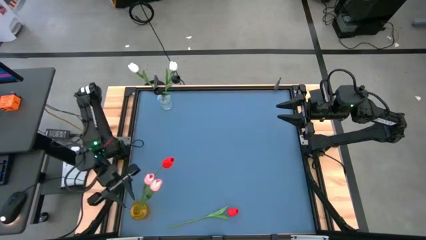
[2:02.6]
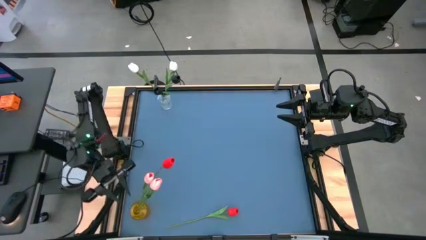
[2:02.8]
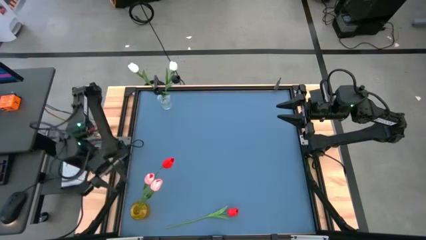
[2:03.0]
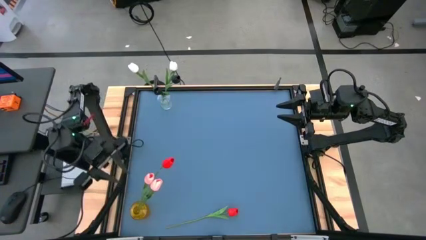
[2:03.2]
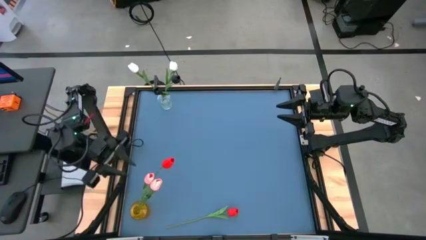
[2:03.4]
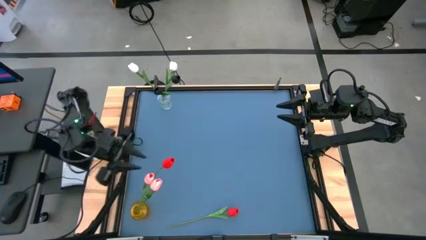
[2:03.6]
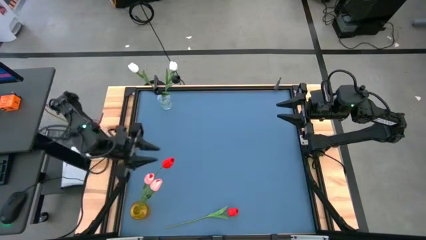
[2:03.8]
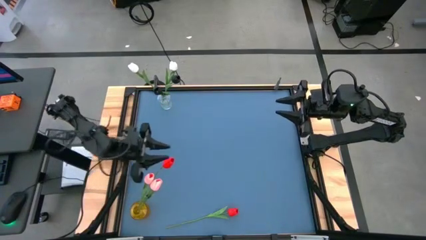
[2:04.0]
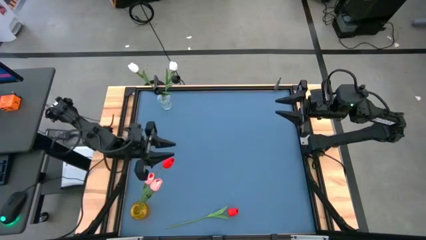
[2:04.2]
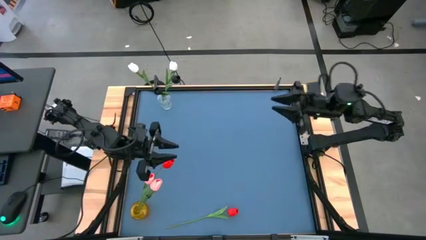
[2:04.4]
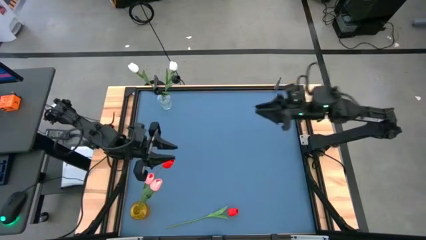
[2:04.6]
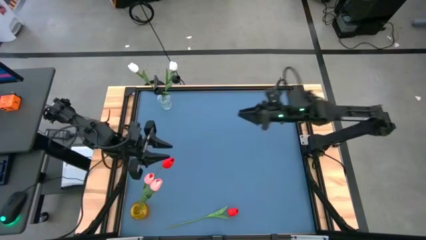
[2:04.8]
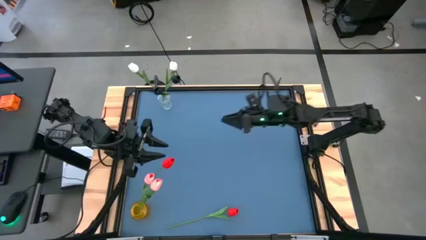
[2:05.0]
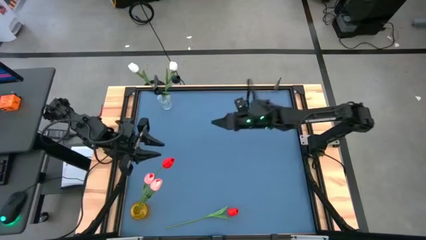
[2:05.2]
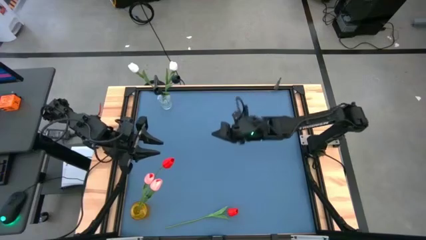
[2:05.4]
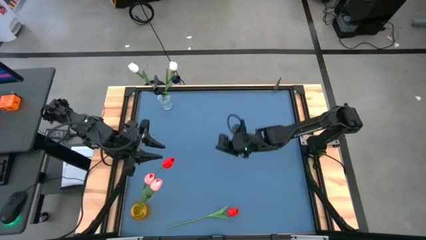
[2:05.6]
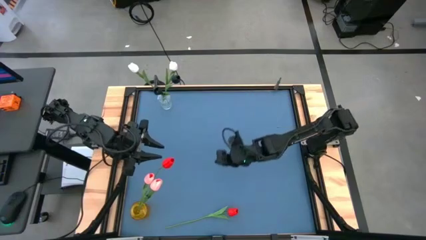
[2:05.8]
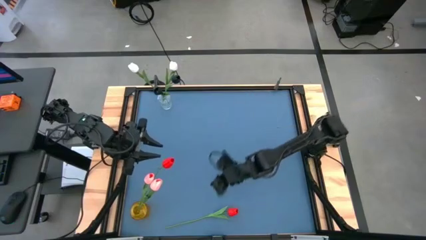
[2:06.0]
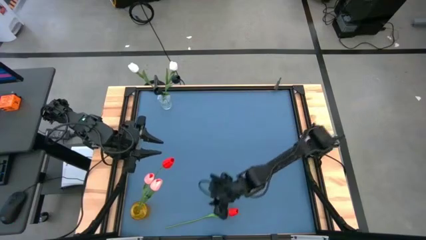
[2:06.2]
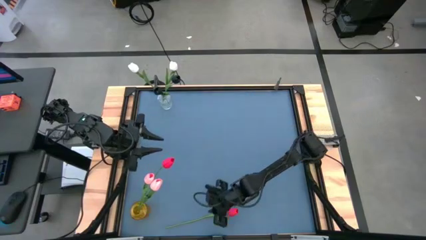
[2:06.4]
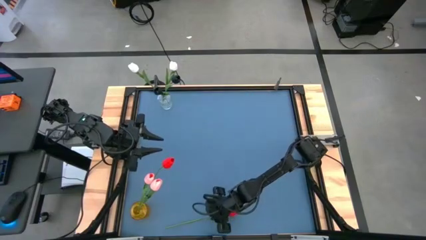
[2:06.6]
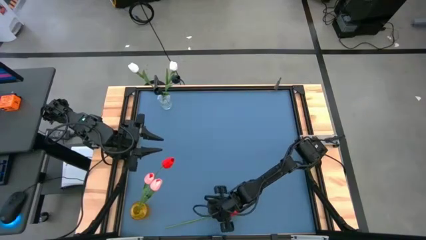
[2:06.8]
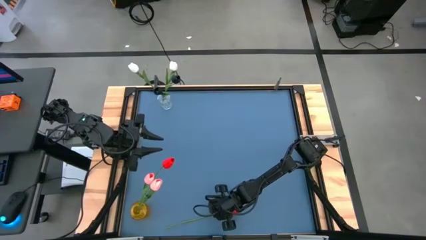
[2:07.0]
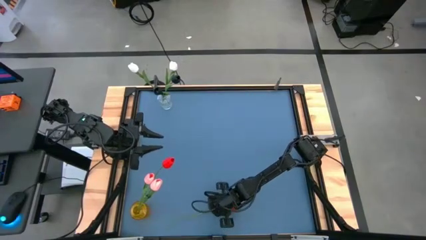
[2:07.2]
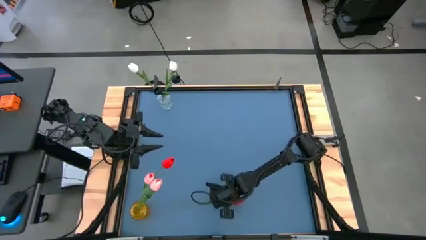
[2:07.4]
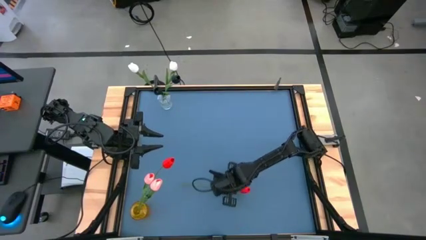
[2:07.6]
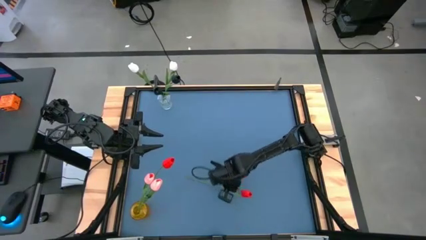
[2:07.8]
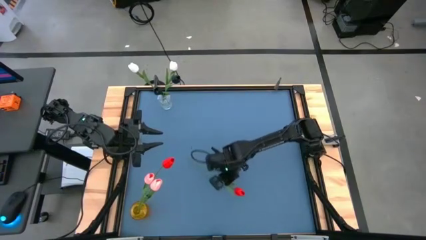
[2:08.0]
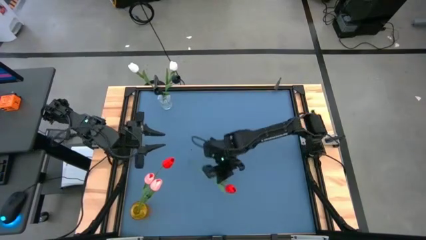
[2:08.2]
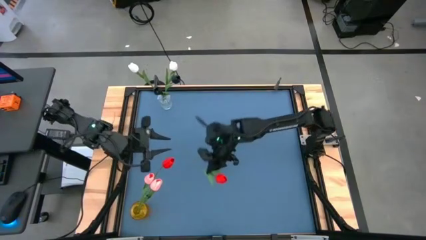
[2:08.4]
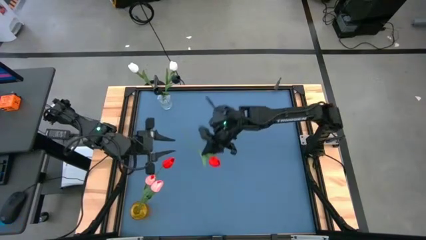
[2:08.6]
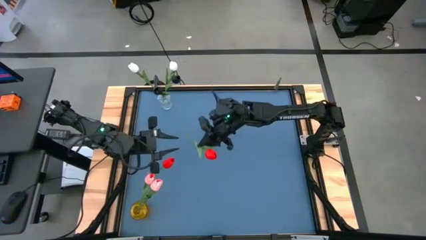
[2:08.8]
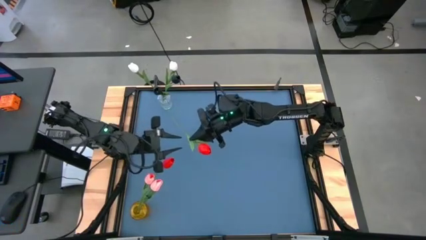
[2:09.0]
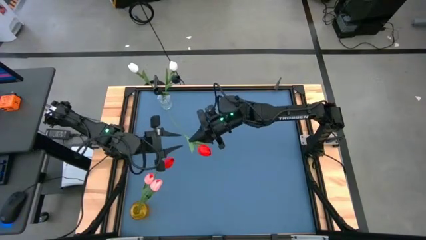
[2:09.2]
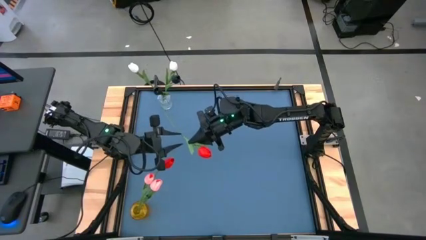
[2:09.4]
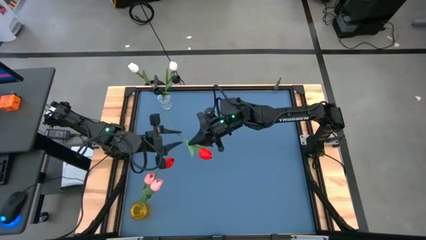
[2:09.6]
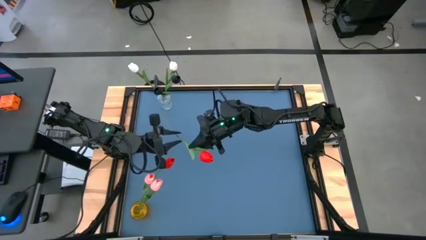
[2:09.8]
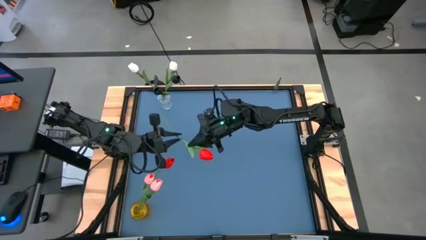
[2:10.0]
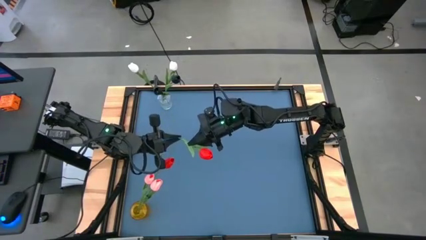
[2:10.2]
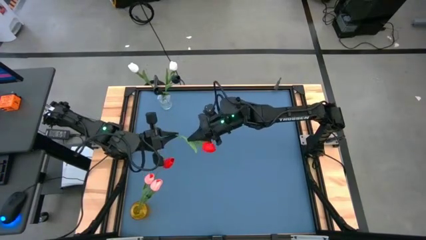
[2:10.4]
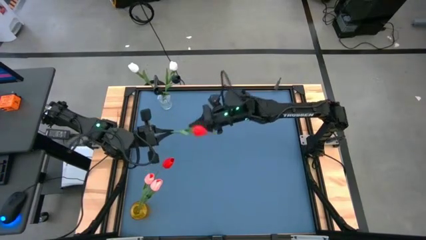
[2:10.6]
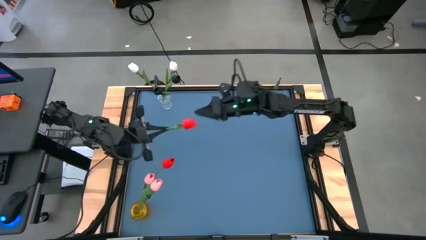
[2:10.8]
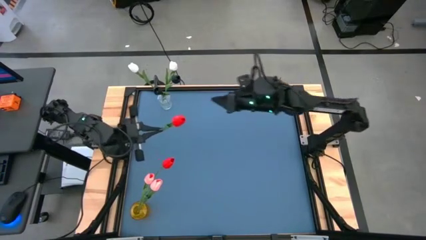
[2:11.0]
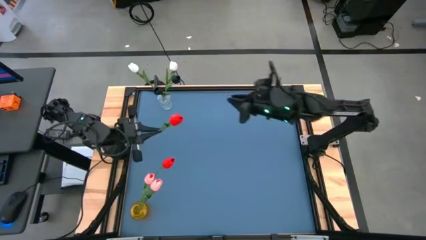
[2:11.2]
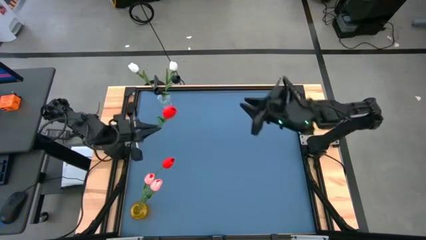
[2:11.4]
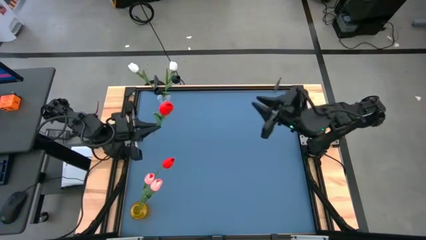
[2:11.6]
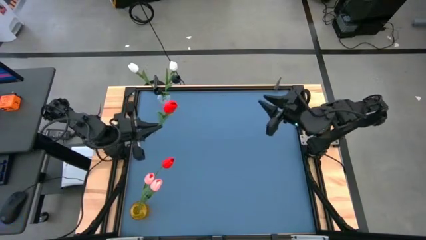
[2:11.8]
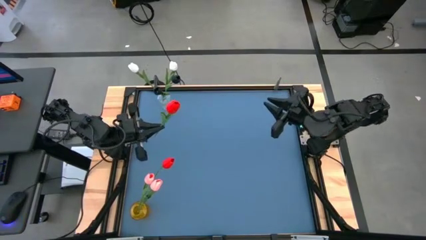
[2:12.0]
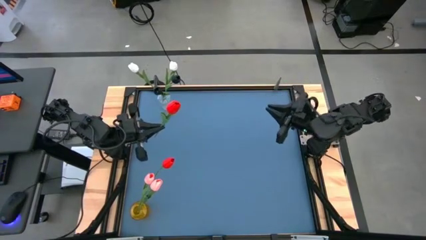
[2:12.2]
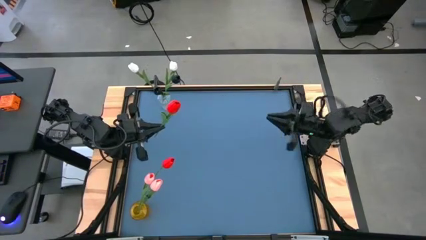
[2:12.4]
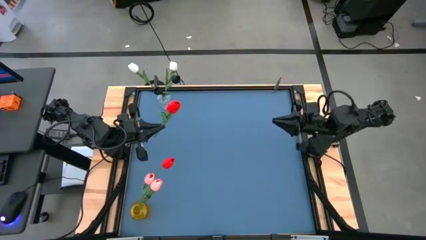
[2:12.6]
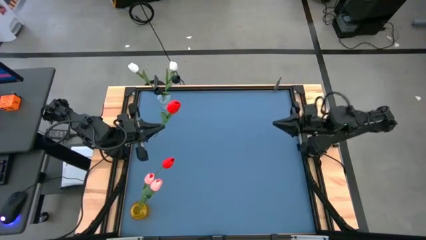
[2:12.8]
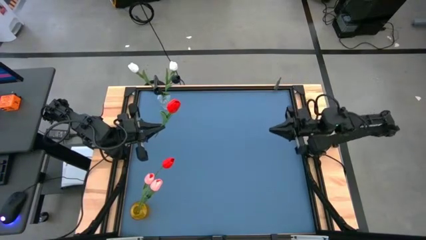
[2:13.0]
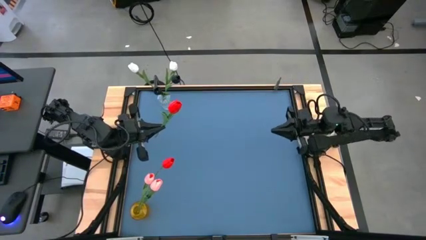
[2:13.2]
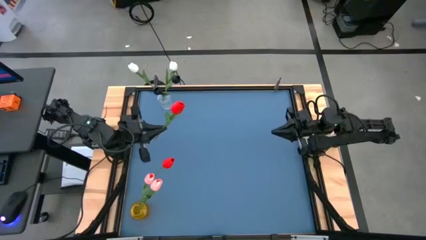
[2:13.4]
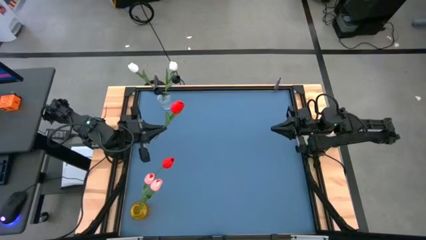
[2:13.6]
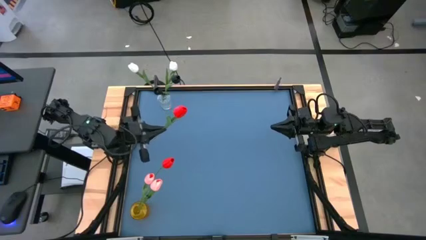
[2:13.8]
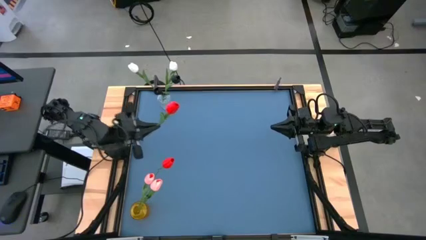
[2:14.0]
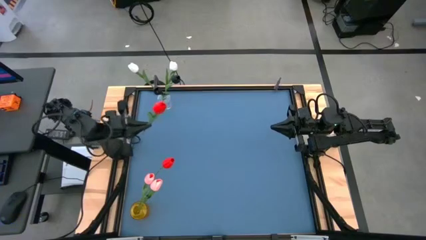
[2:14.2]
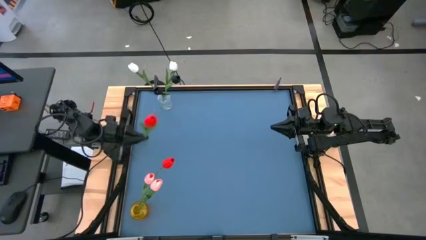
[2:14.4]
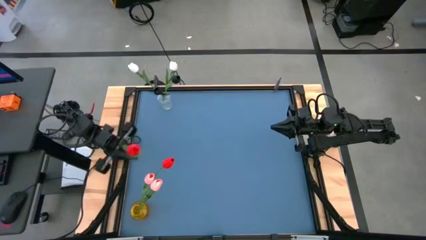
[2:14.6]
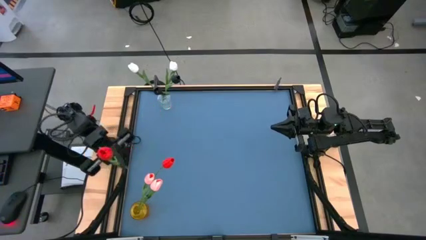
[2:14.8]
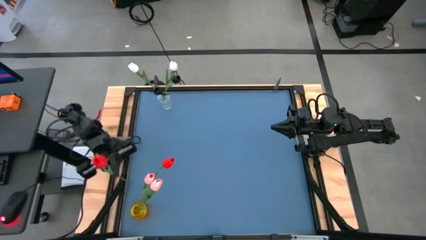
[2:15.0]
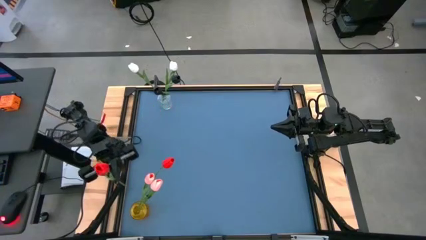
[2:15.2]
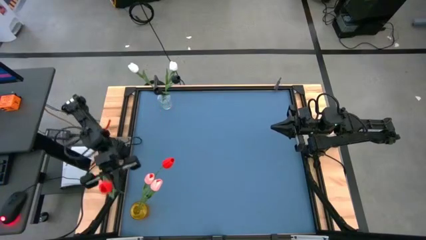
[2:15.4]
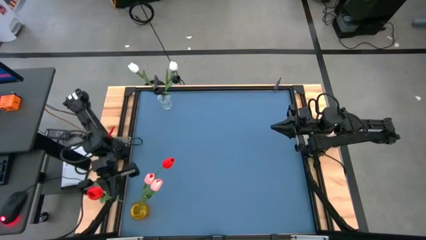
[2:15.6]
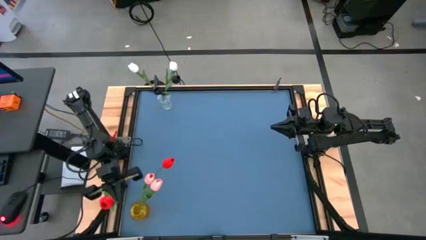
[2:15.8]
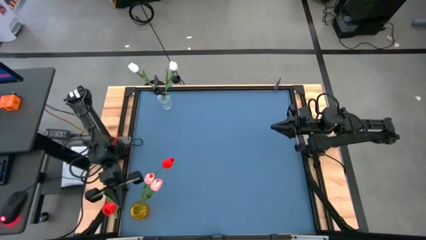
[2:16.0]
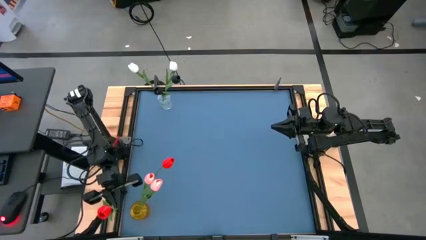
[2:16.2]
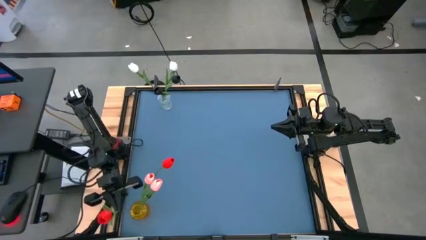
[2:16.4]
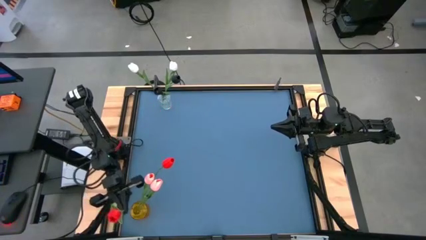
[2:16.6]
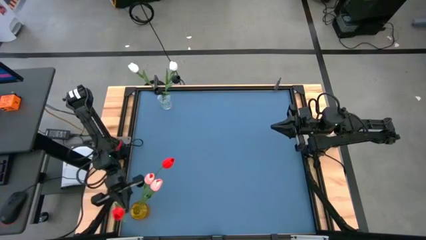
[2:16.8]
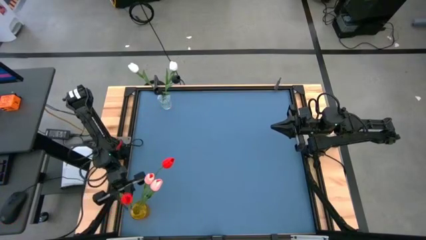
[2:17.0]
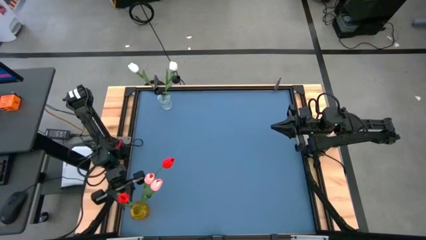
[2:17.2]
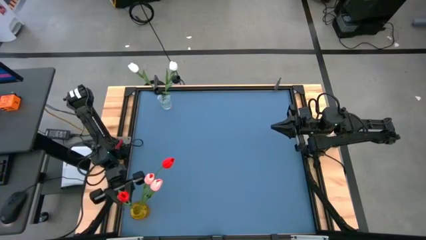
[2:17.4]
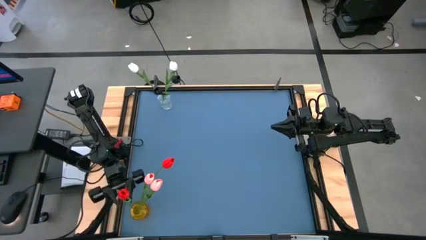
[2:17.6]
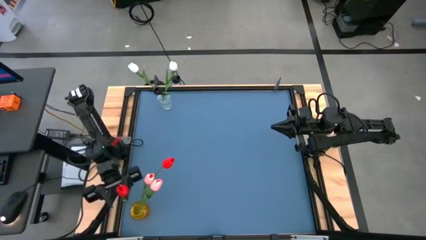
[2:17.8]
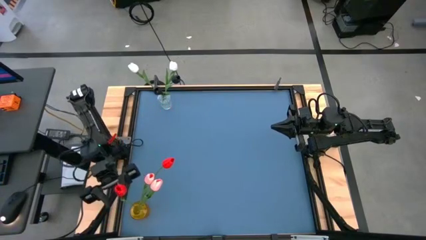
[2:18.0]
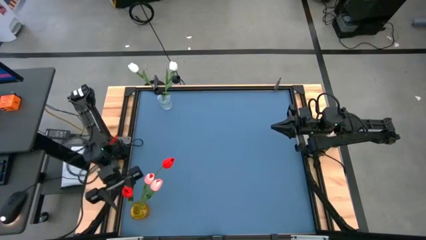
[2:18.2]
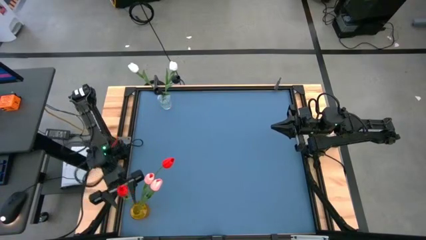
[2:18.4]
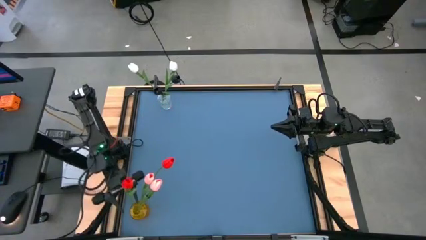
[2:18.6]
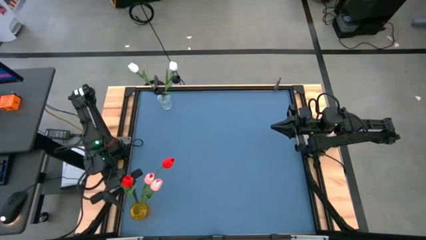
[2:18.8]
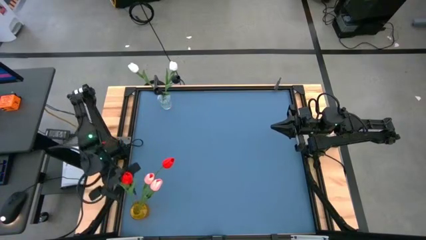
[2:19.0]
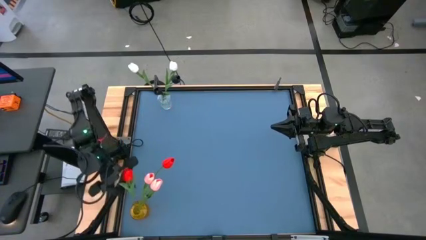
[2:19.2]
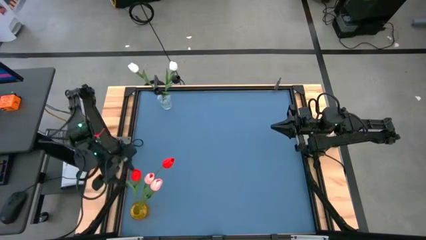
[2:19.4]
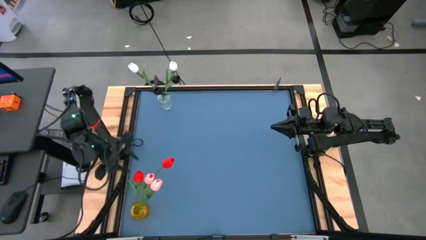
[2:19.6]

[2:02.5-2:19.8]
Task: Sort flowers into vase by color
Put the red tulip into the yellow vase

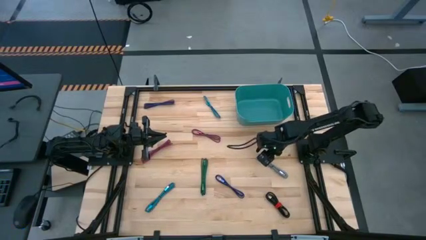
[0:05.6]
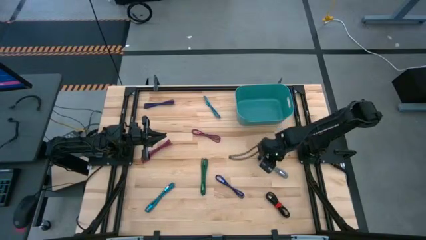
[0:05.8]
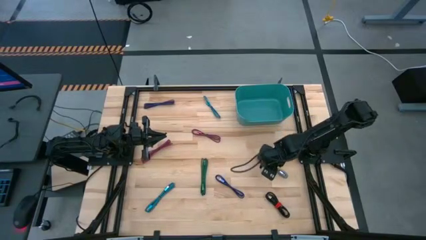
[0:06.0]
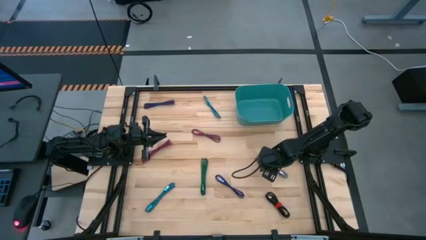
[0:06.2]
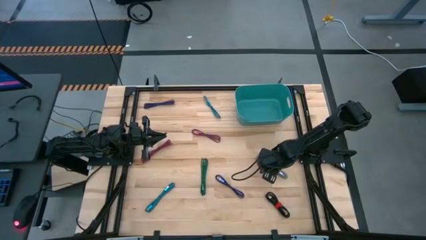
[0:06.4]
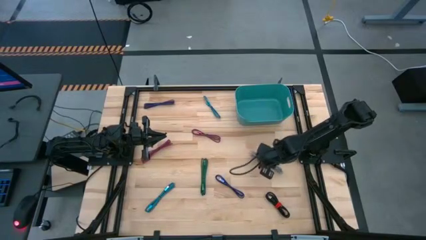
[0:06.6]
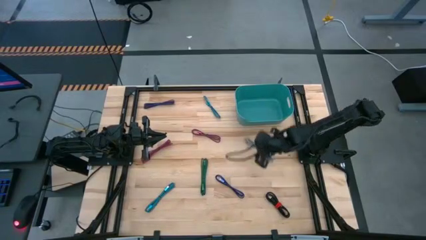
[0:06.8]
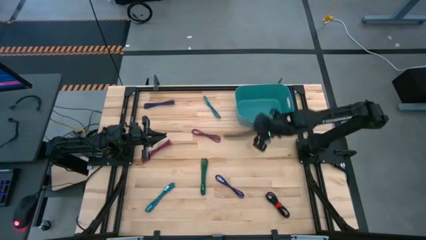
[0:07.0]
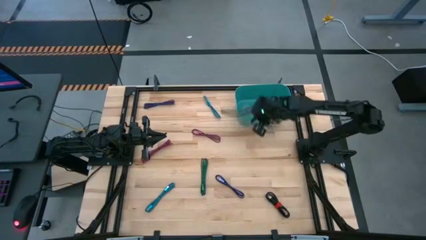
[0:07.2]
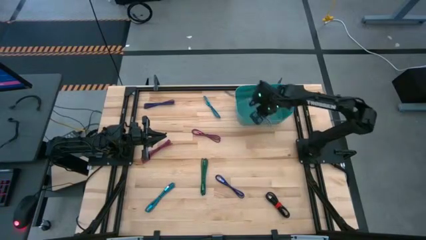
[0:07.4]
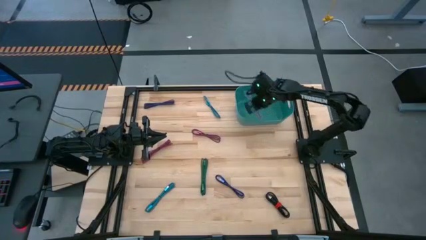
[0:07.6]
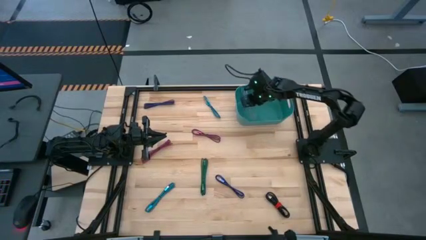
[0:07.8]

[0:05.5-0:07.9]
Task: Pick and place USB-C Cables
Put the white charger cable into the light blue bin
